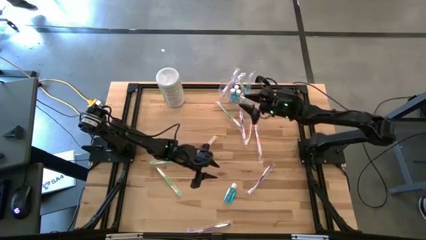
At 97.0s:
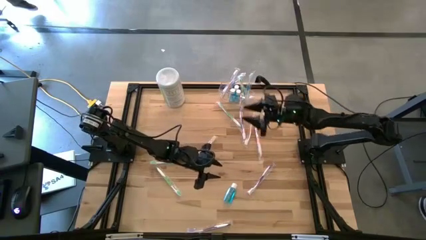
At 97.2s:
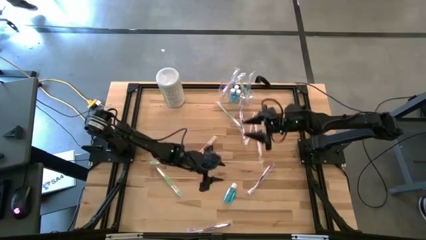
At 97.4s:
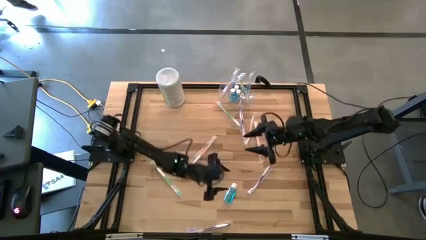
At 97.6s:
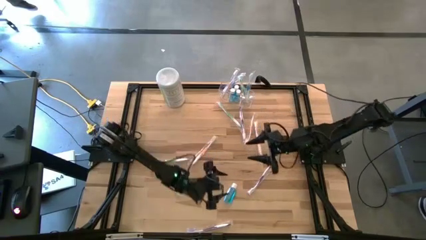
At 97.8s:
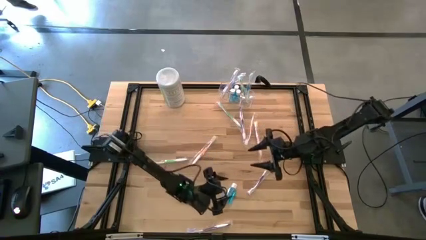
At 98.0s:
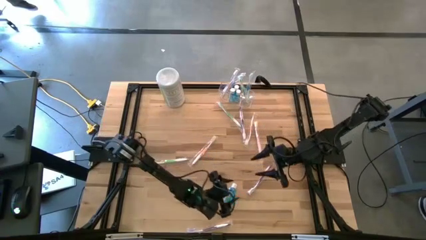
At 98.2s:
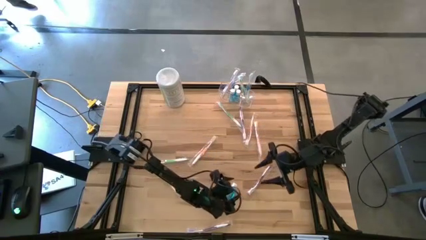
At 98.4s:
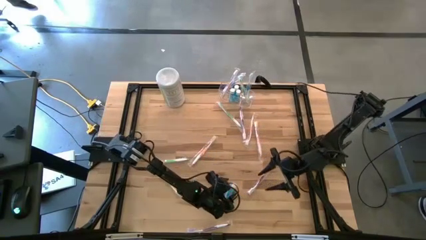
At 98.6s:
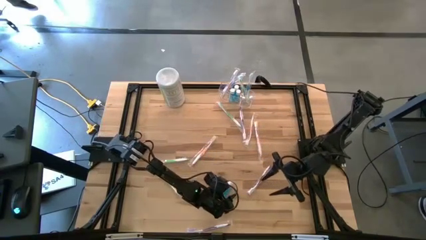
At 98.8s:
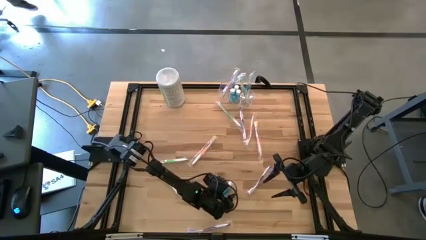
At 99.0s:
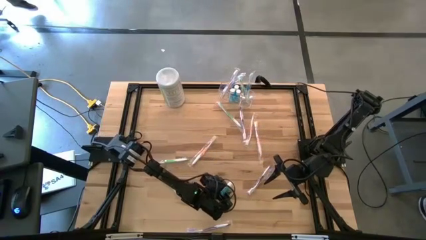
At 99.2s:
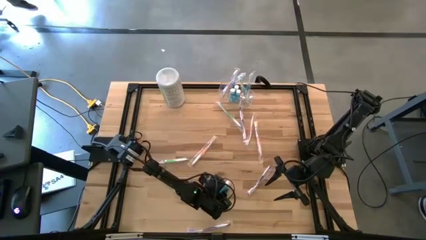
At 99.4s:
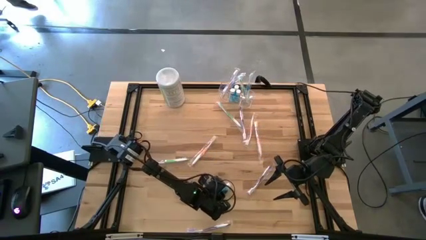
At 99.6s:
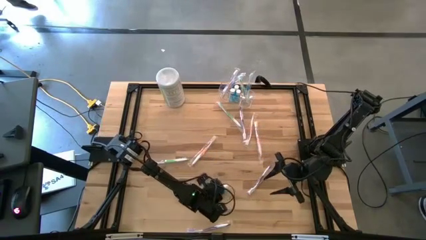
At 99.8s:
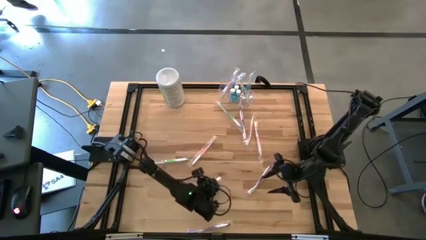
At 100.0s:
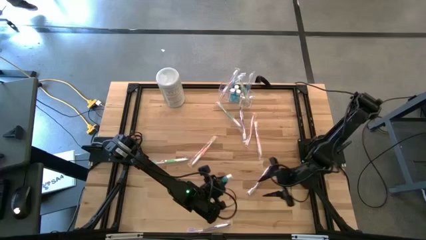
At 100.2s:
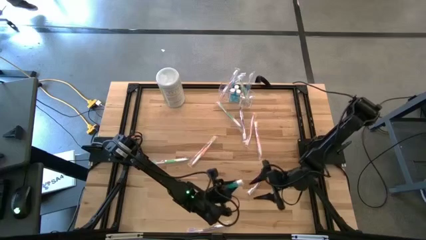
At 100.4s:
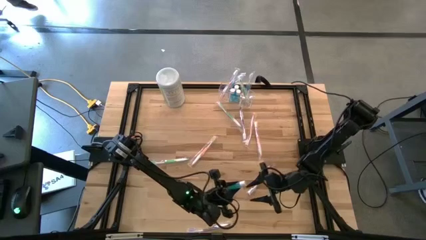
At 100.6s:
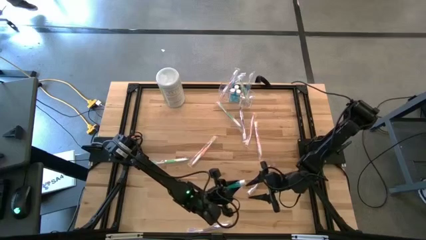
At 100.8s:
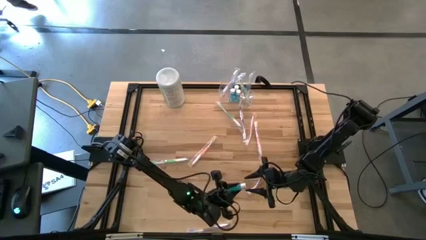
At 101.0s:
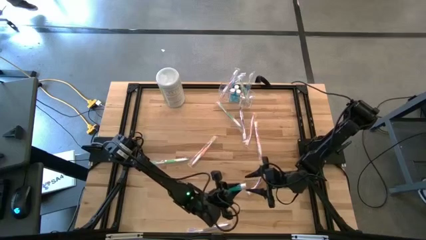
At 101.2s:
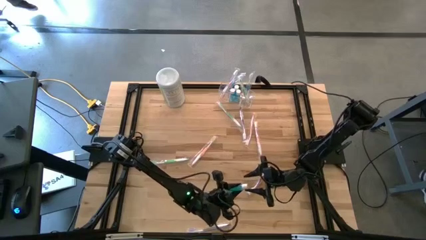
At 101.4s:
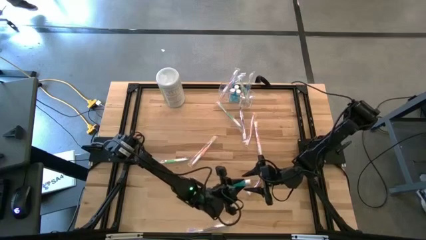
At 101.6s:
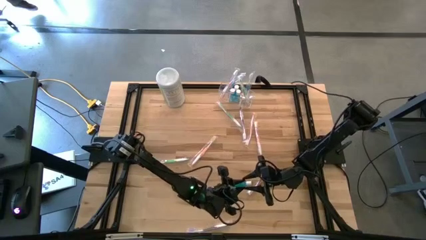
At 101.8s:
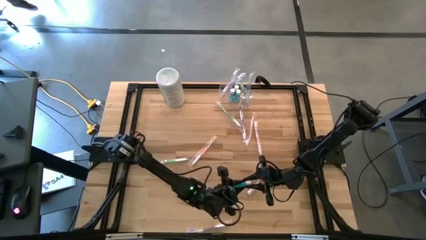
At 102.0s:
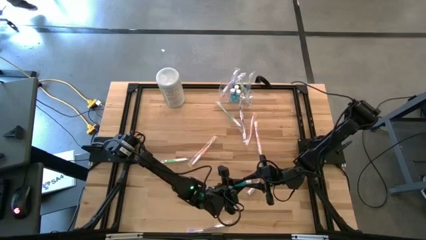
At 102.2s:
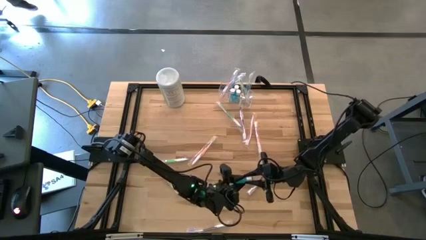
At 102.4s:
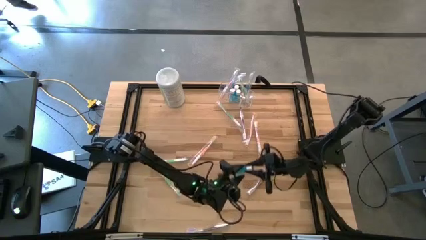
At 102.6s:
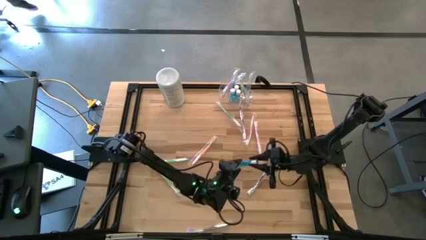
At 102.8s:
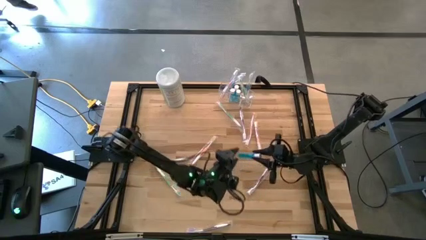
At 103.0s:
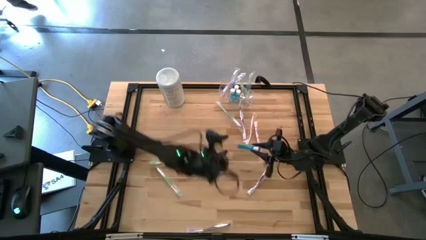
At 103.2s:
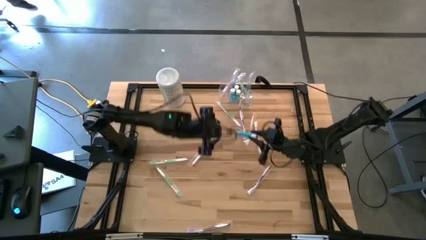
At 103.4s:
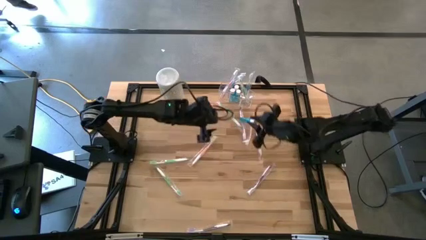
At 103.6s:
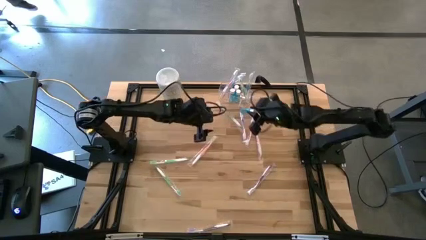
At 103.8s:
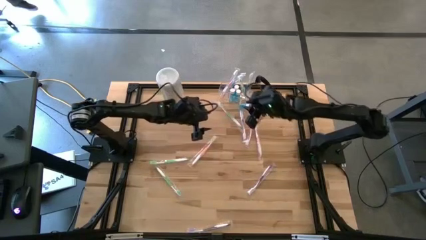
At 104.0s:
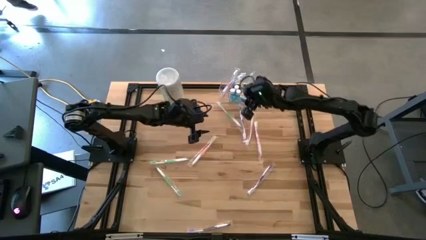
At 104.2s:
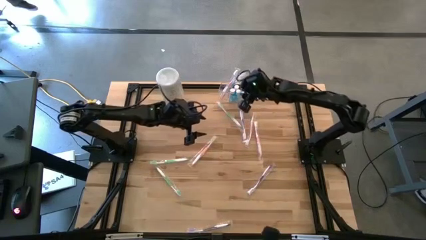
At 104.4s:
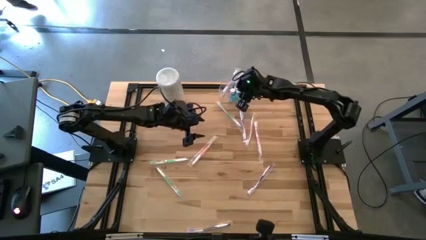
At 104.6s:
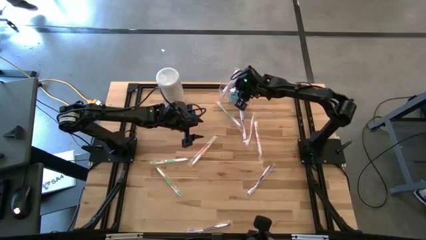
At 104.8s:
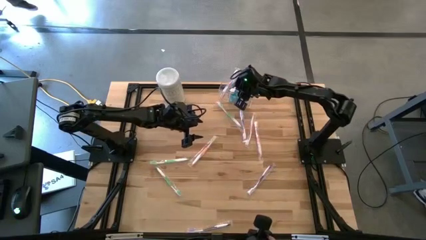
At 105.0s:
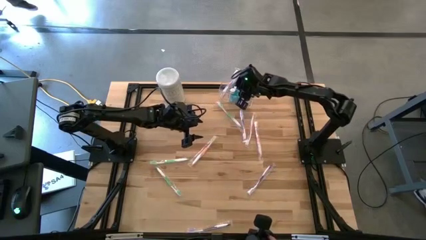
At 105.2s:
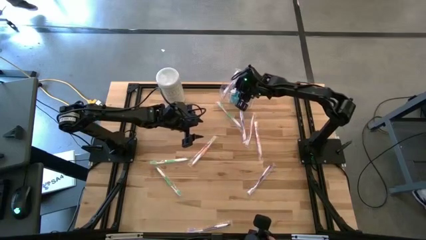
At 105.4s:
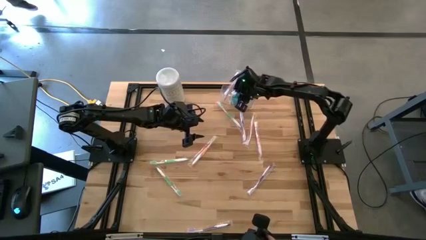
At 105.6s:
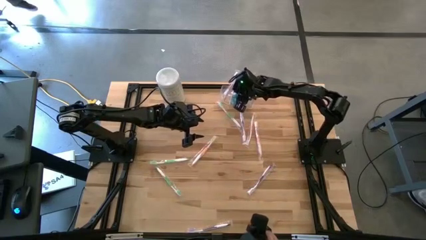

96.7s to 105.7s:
Task: Pick & Place toothbrushing station
Put the blue mouthwash into the transparent organizer

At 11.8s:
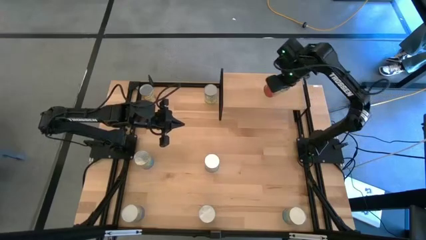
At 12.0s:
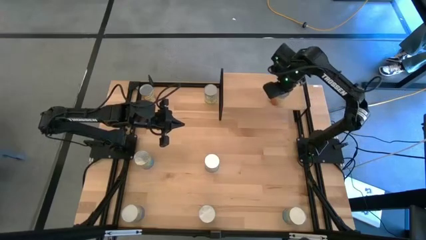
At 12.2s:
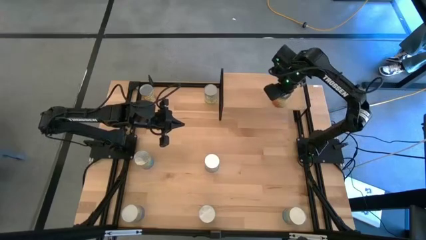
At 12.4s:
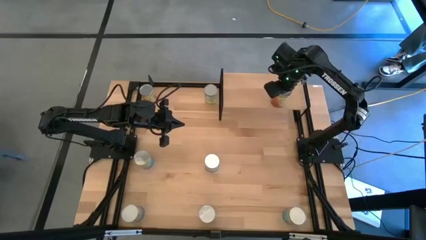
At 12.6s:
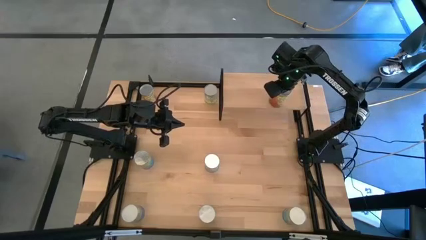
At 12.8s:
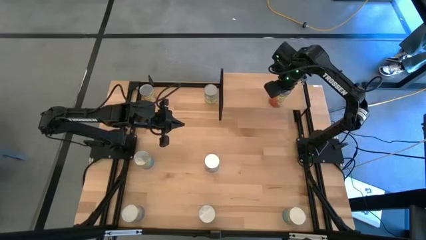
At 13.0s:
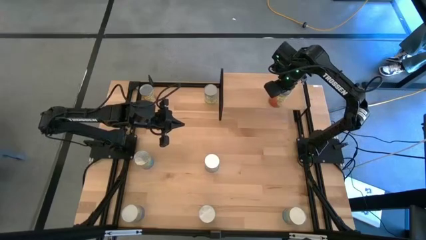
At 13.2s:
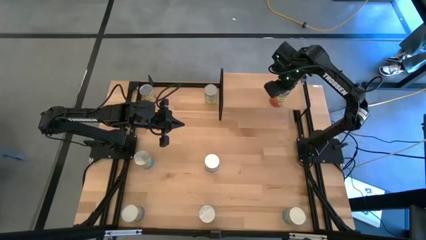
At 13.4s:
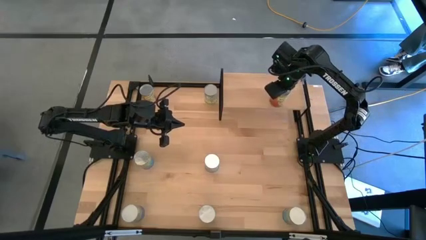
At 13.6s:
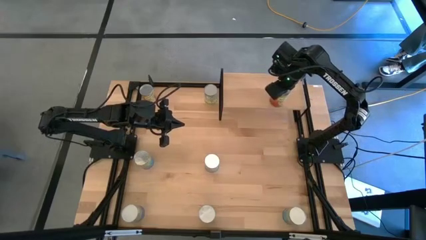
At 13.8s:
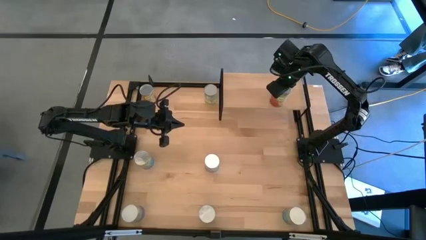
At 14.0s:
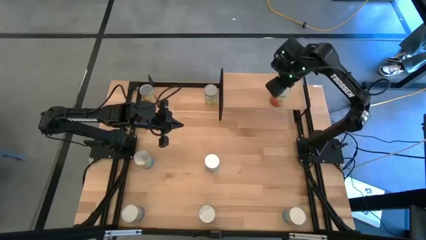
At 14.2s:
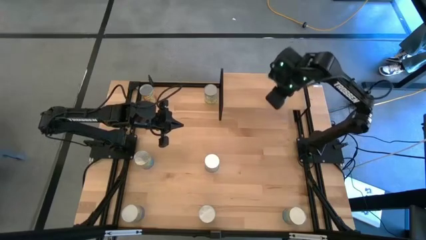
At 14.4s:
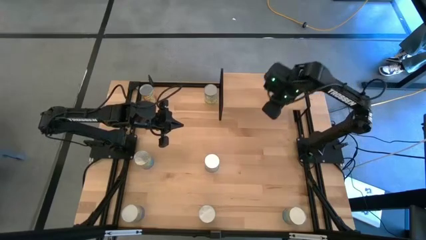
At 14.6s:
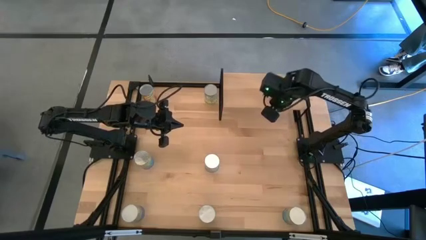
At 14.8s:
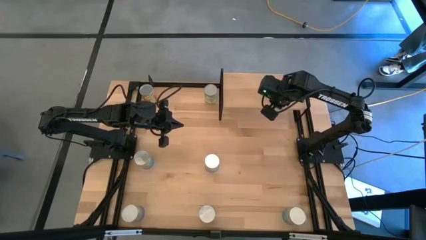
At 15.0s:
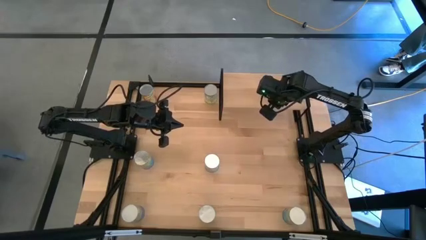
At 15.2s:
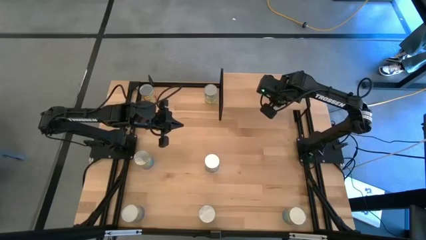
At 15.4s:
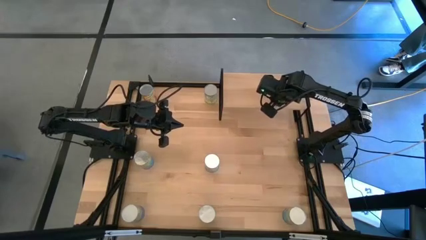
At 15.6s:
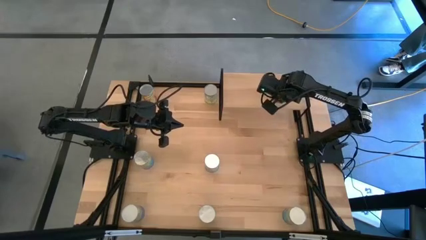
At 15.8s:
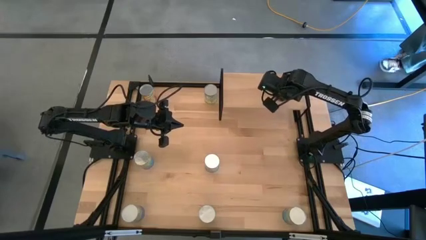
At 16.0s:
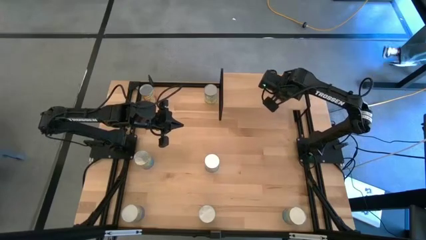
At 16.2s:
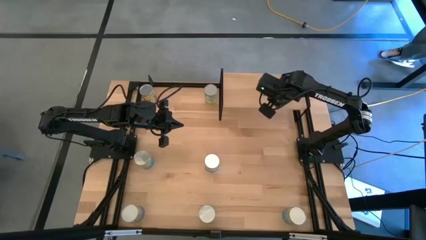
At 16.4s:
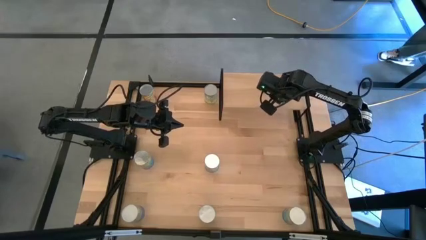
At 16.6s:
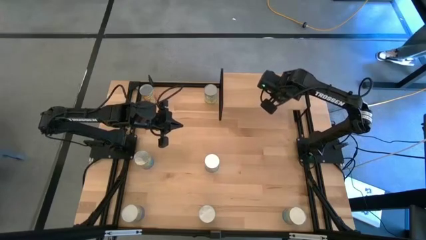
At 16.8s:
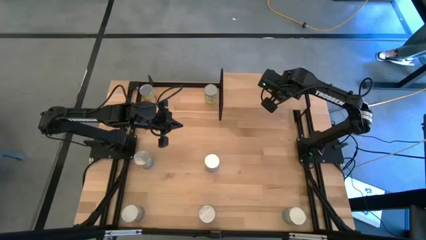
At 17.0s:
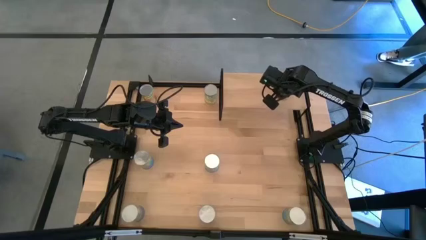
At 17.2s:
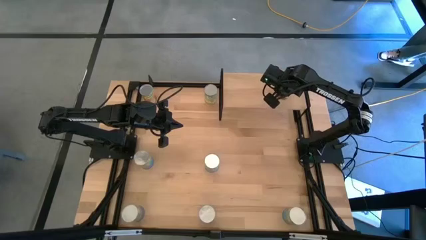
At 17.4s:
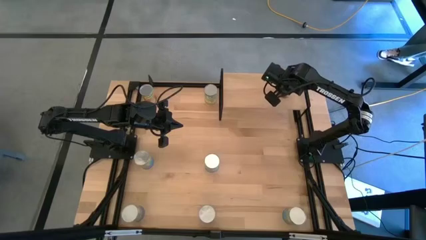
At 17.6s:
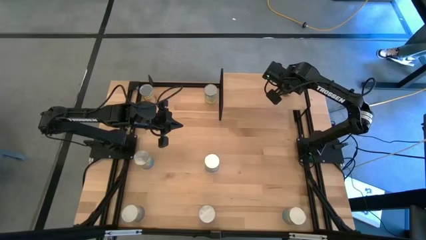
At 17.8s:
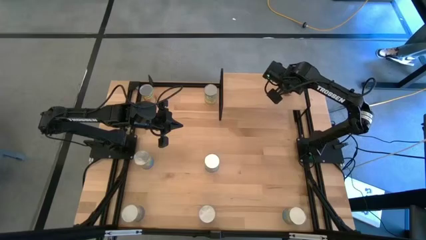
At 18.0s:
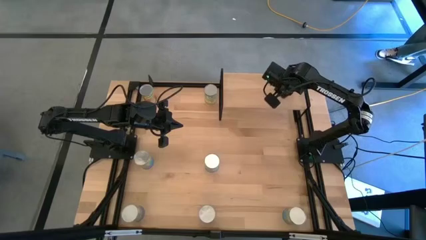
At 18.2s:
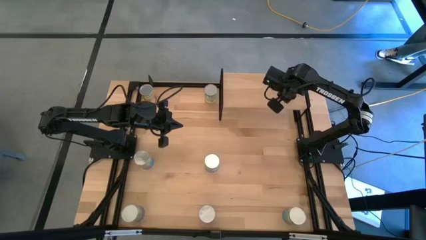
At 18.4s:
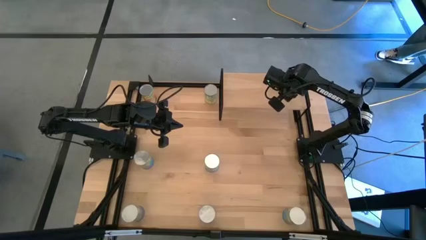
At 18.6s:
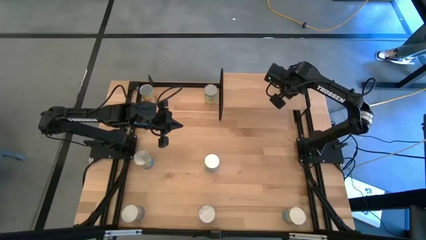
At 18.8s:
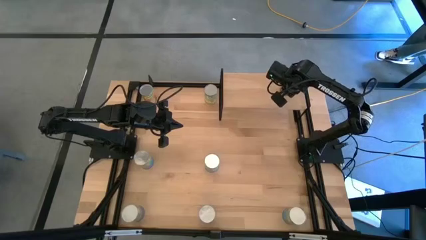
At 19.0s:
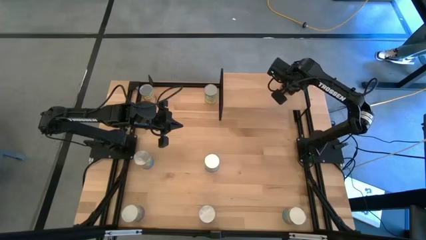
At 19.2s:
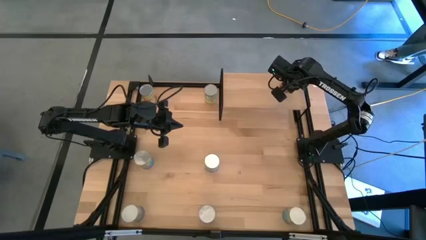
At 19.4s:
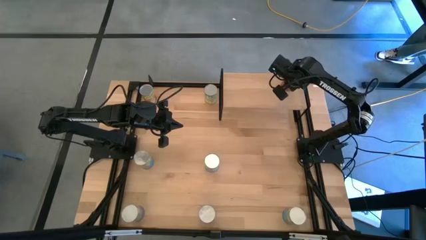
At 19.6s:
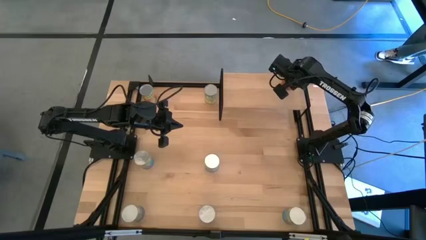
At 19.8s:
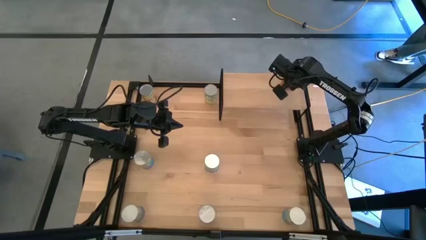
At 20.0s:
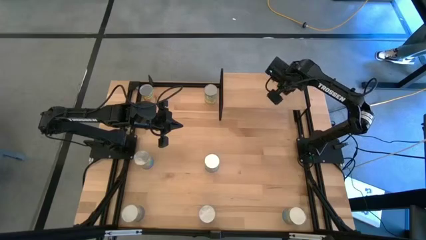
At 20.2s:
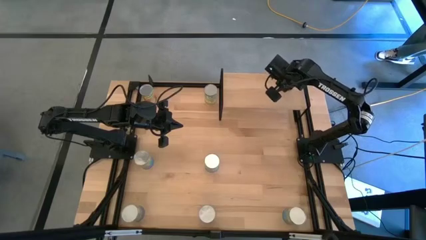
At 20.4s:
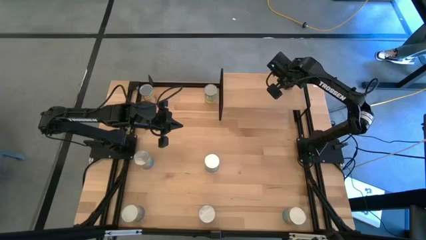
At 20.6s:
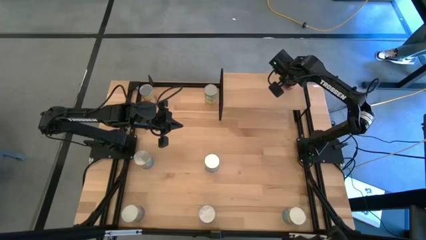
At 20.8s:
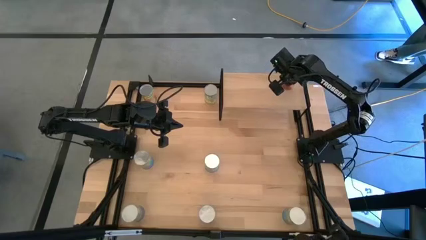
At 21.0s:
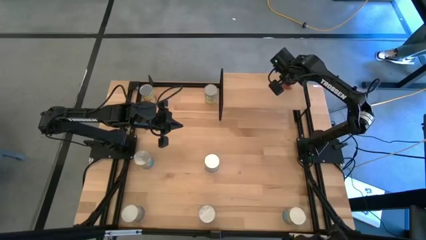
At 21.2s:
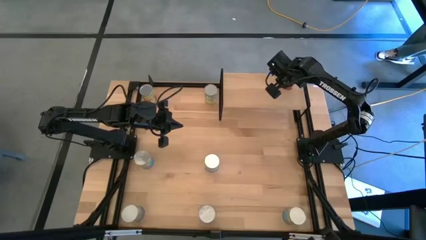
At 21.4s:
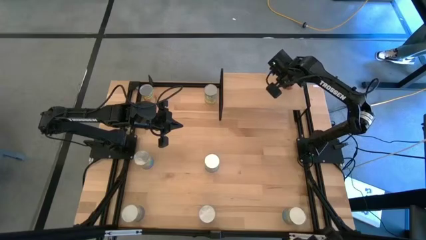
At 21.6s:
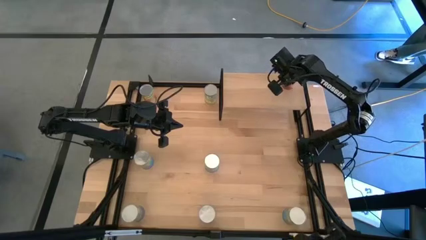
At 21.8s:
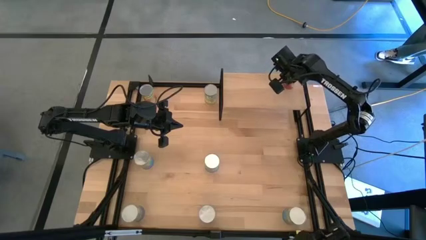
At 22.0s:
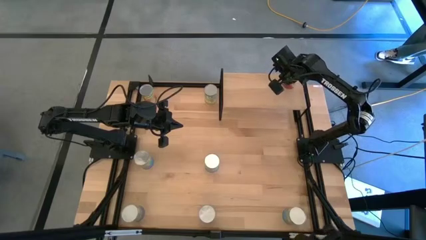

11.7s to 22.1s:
Task: Pick and place cans onto a shelf
Put the canned green beans on the shelf
